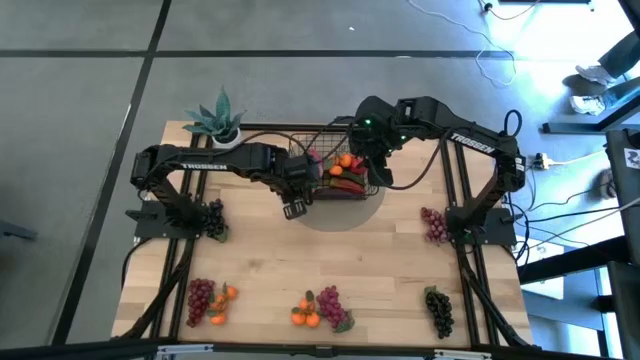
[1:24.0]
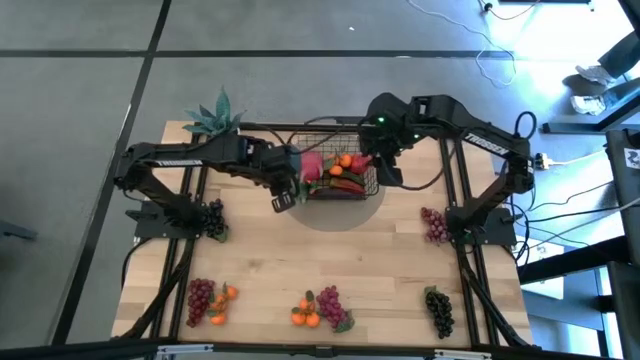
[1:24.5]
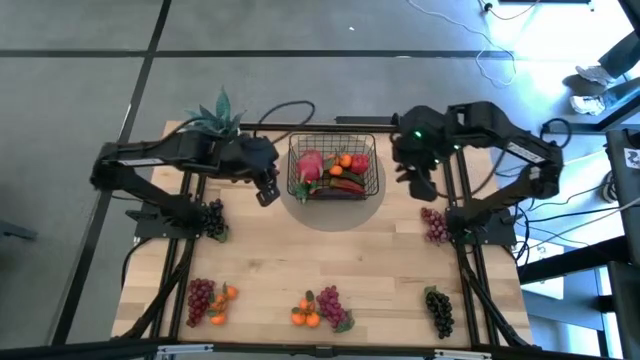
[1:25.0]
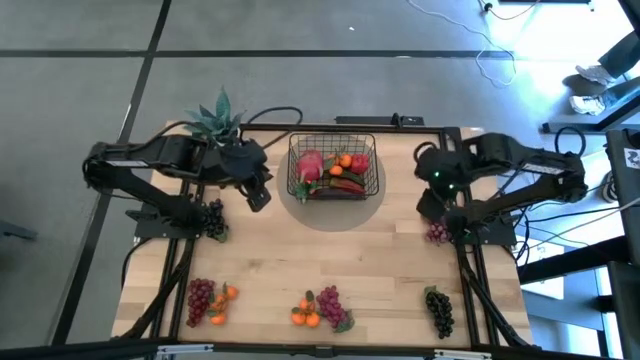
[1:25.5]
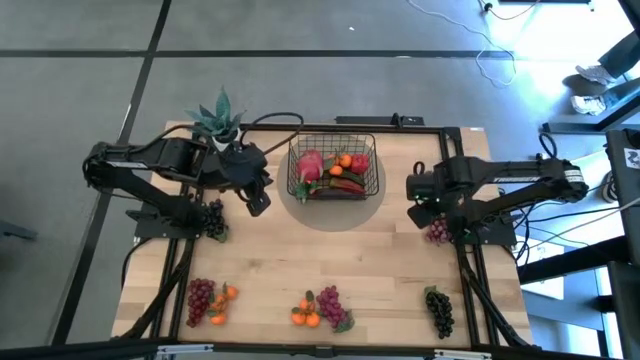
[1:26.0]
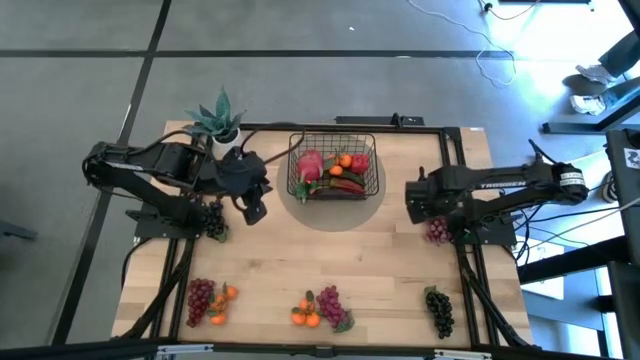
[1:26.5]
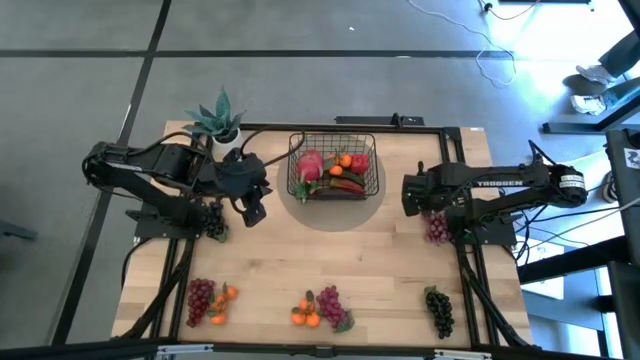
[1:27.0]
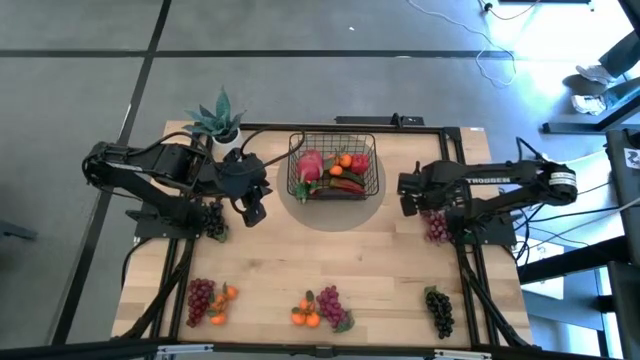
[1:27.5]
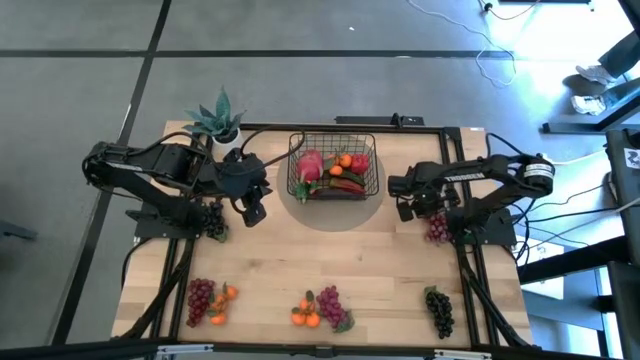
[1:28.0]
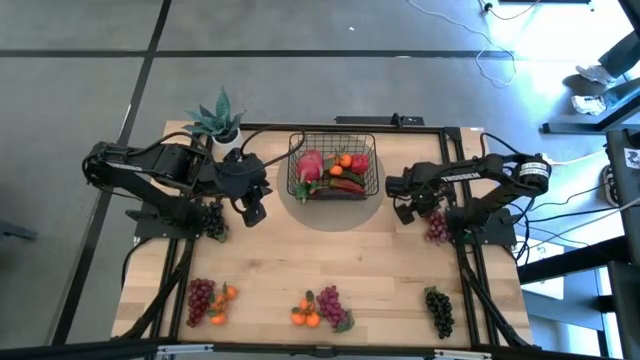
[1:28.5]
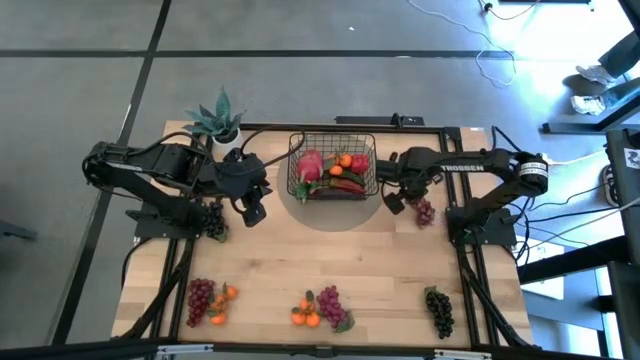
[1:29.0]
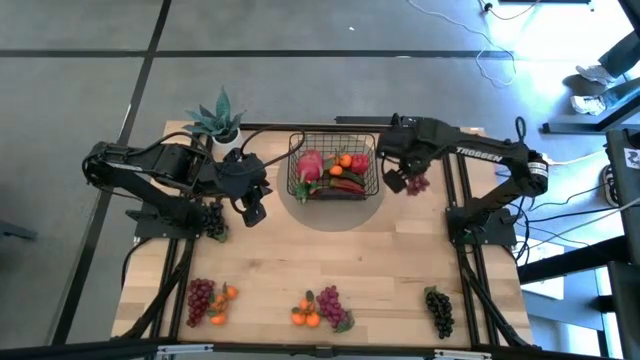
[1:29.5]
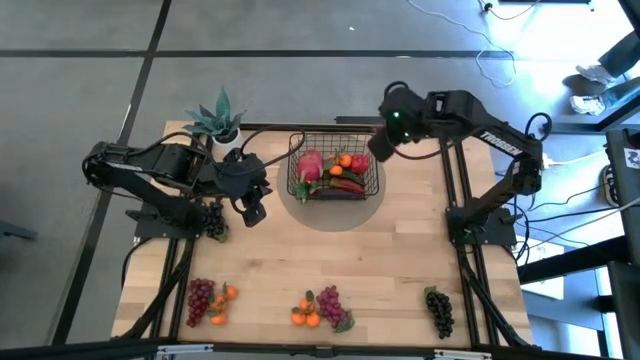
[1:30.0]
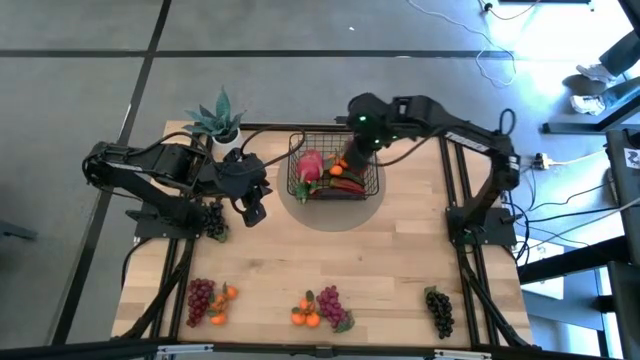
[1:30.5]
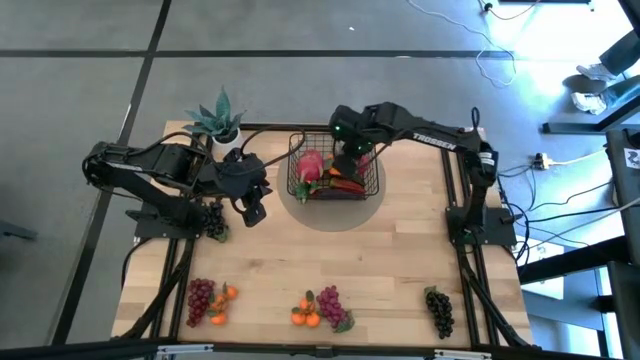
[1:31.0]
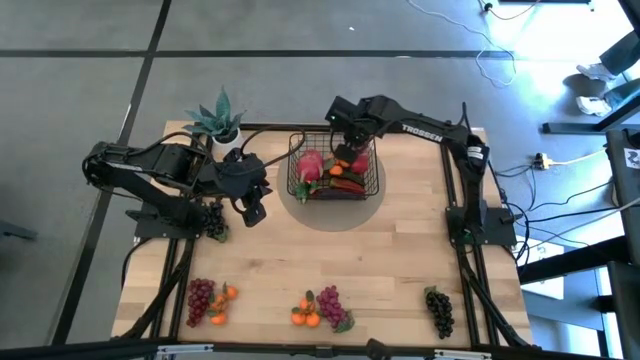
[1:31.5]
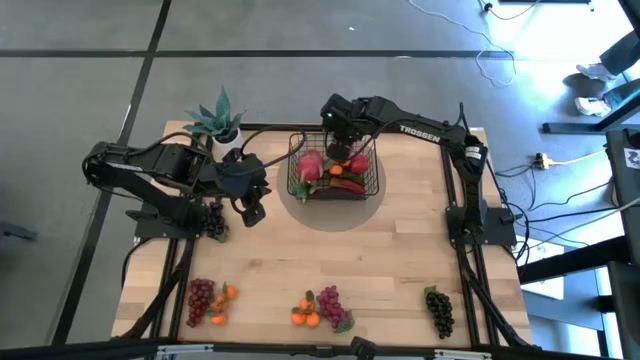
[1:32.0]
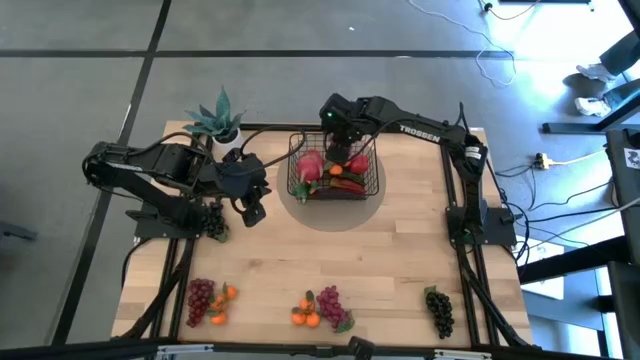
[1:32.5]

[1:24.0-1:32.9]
Task: Build produce basket
Put the top right purple grapes into the black wire basket

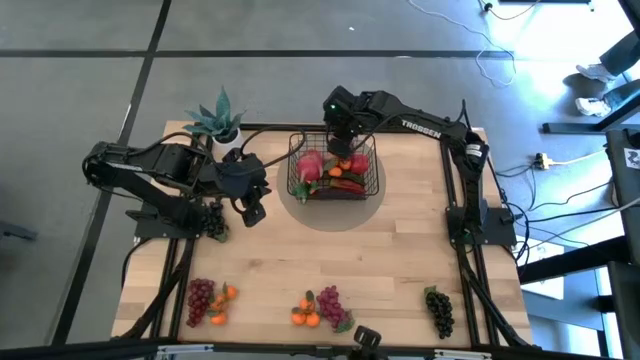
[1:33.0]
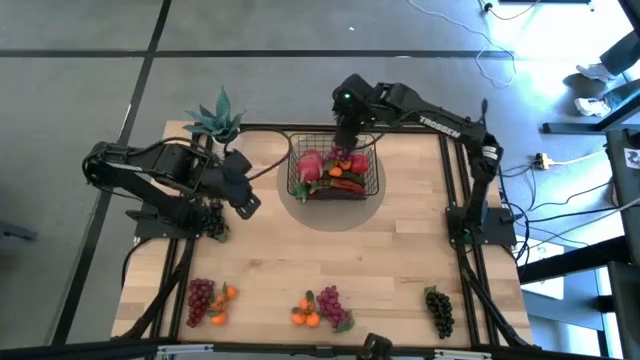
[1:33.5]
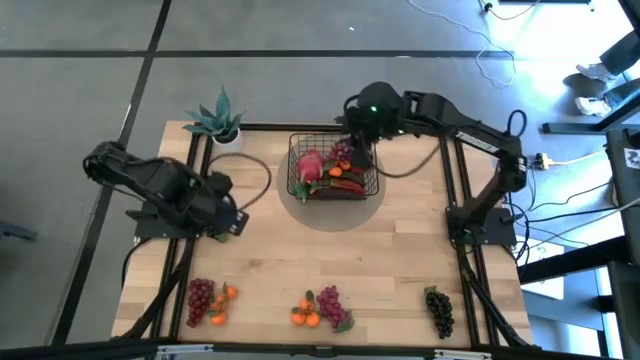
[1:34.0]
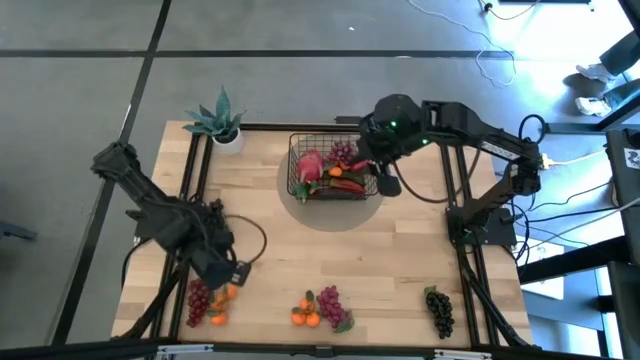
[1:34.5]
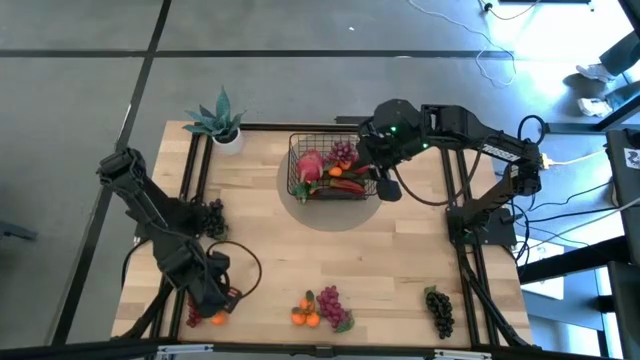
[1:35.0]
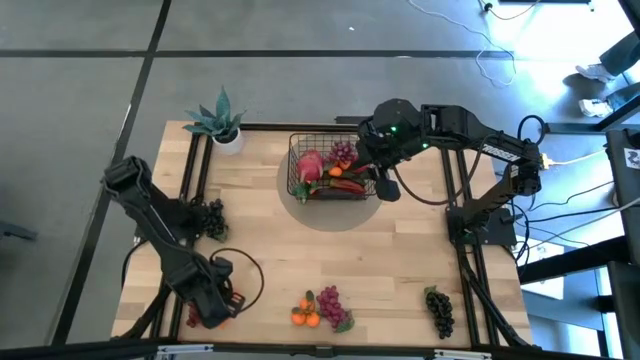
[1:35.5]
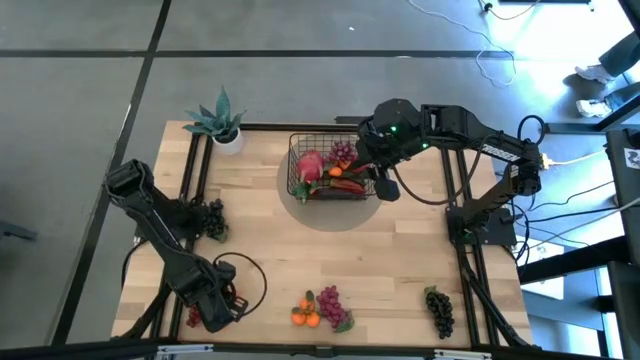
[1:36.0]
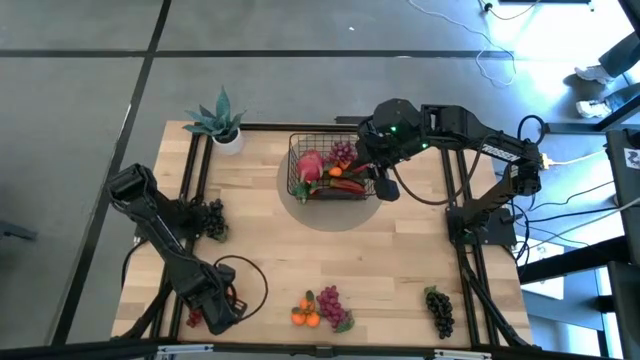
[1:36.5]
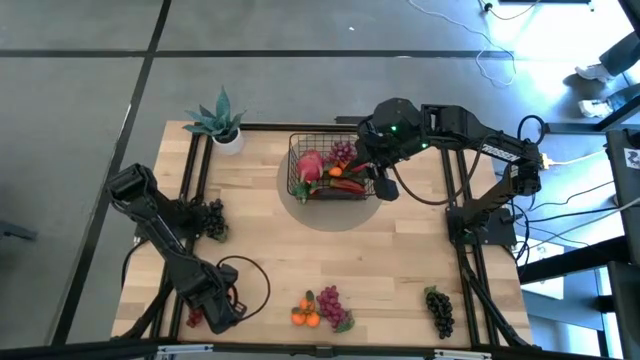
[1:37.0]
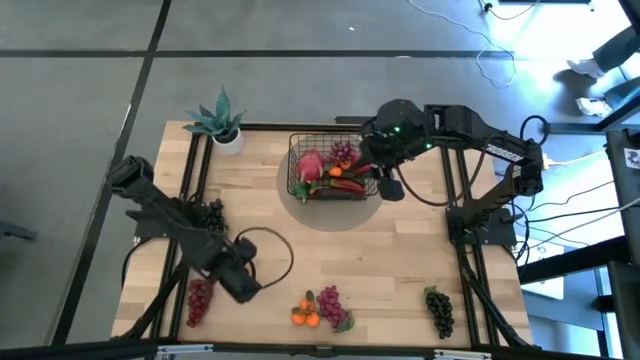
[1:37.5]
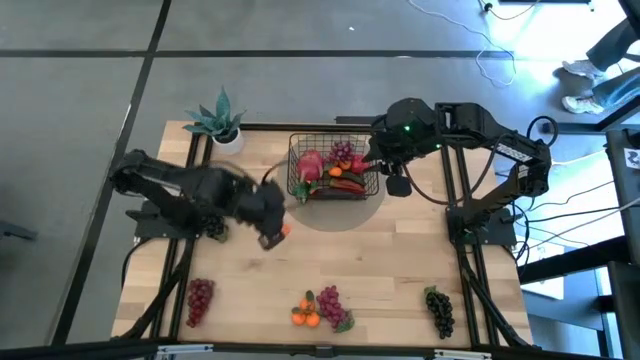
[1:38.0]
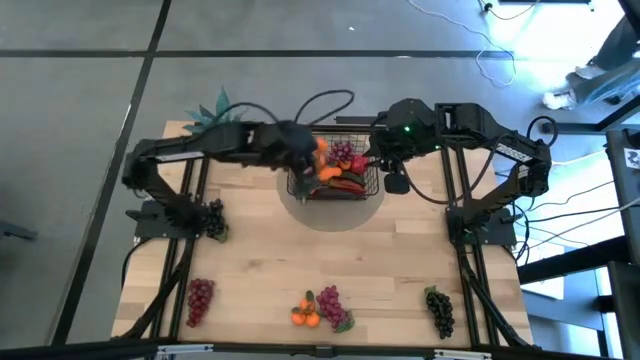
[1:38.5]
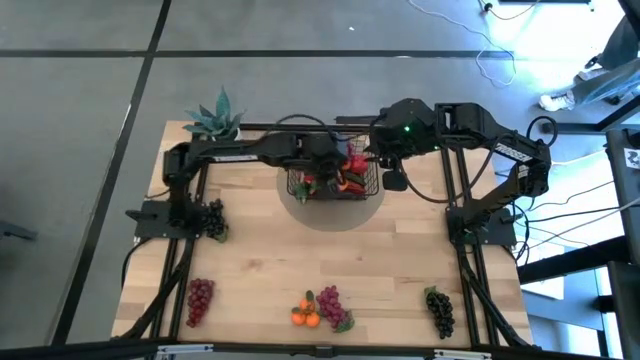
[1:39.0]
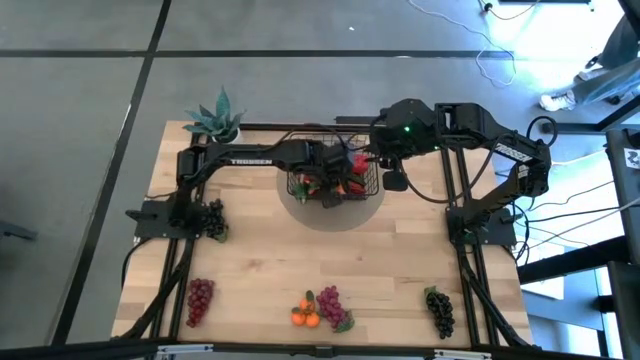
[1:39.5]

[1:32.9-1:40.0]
Put the left tangerine into the black wire basket

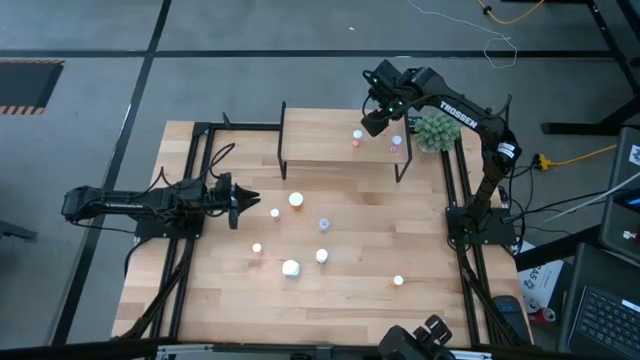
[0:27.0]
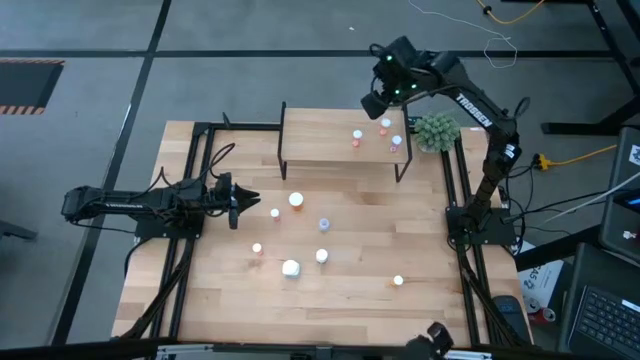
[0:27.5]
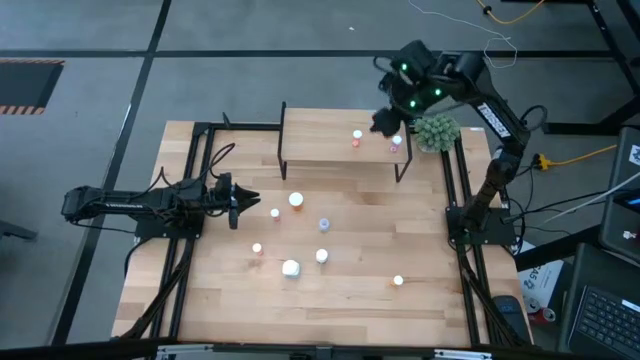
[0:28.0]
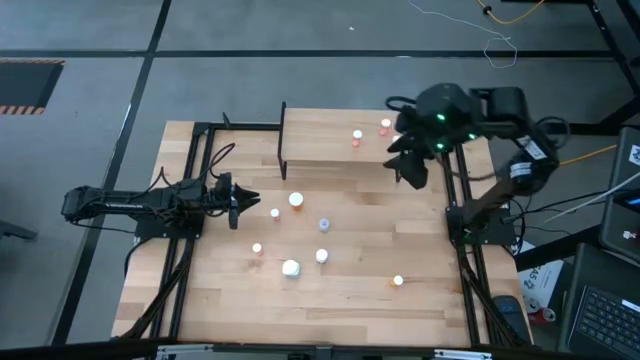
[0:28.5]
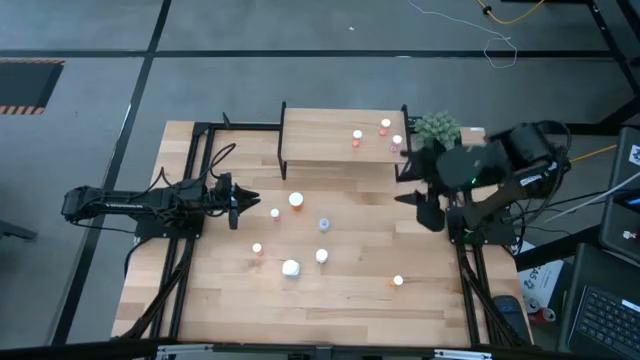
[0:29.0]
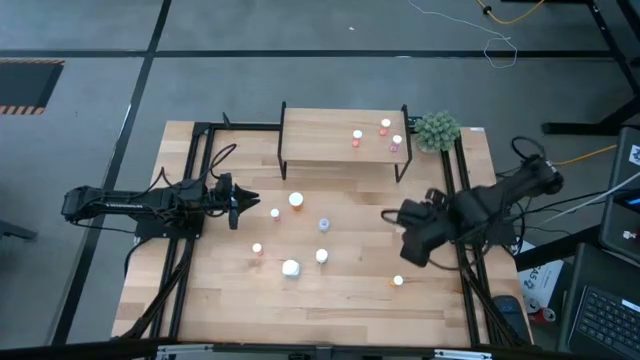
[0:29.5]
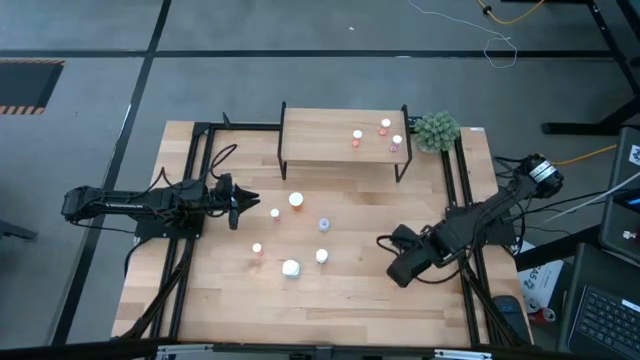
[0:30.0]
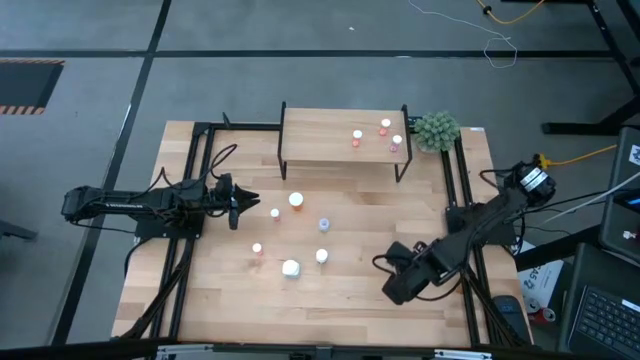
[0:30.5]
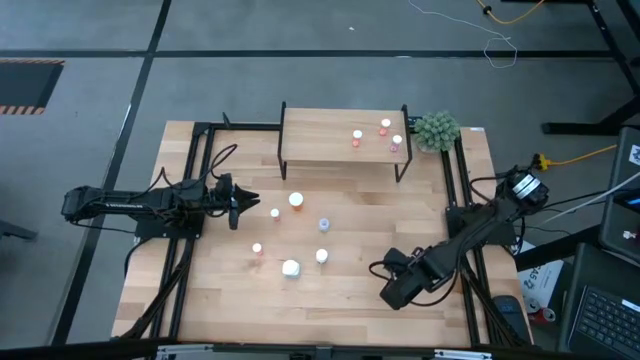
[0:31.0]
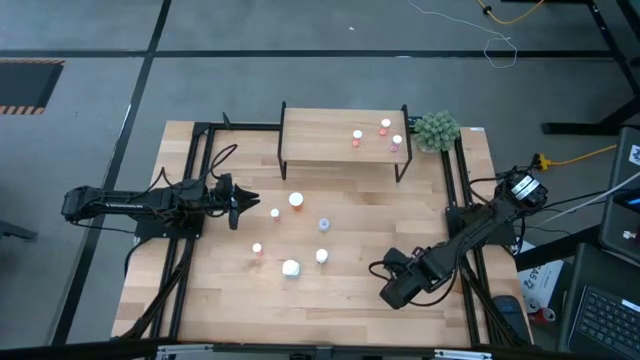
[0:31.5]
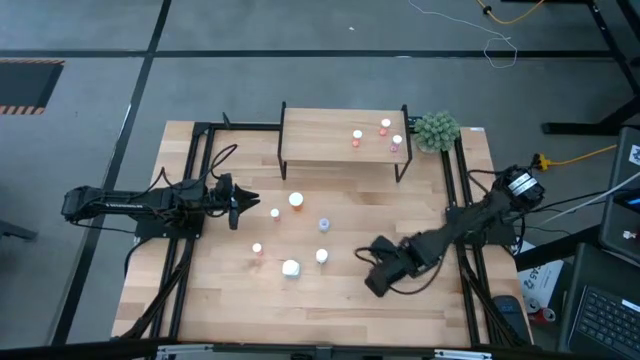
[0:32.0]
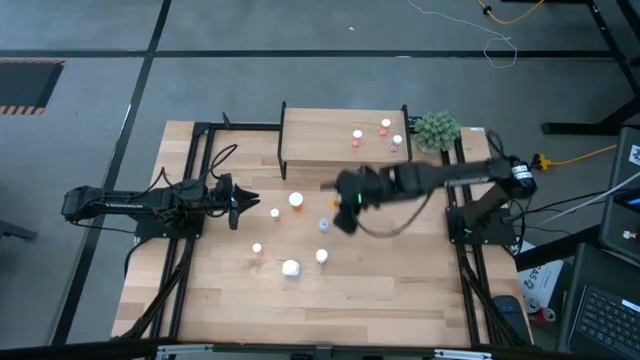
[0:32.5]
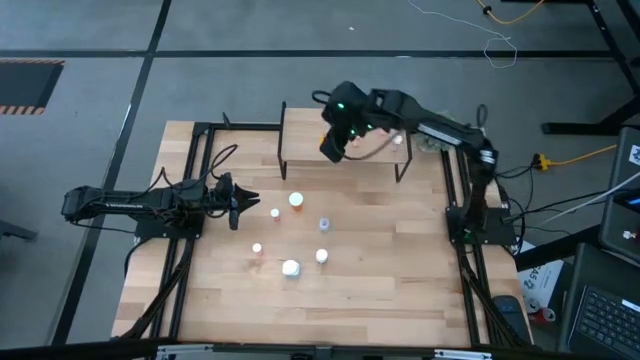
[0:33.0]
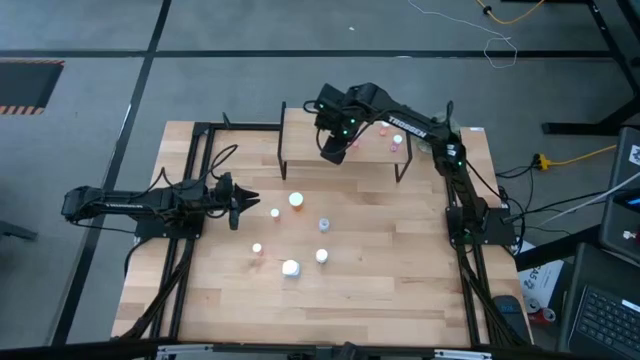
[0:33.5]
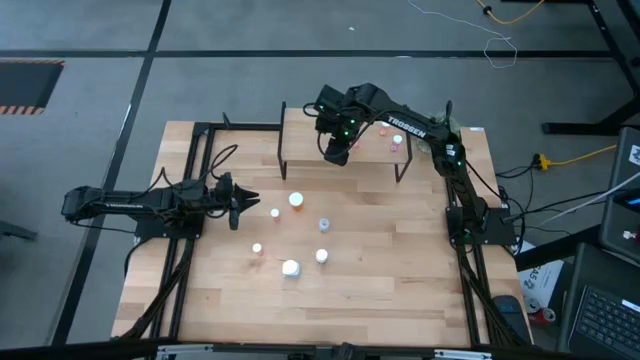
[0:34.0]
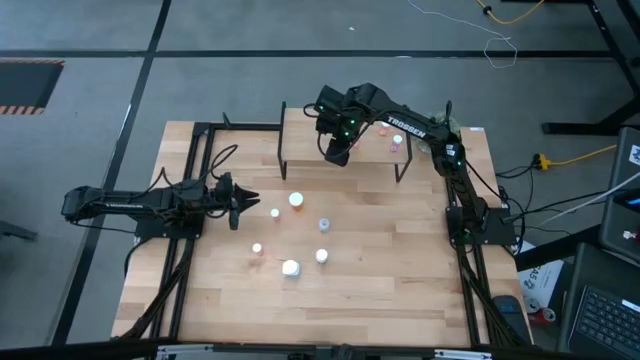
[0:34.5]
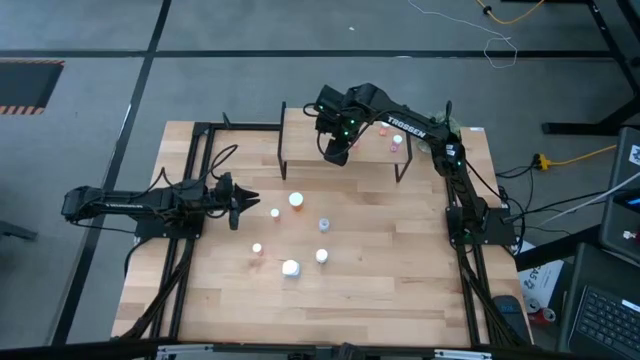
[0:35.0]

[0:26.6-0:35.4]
Task: Pick and place medicine bottles onto shelf by color
Put the small yellow pill bottle on the shelf
